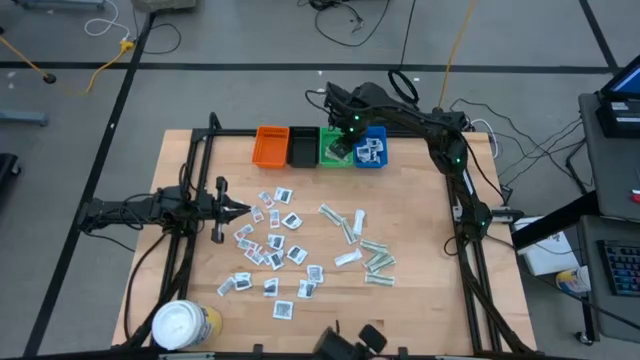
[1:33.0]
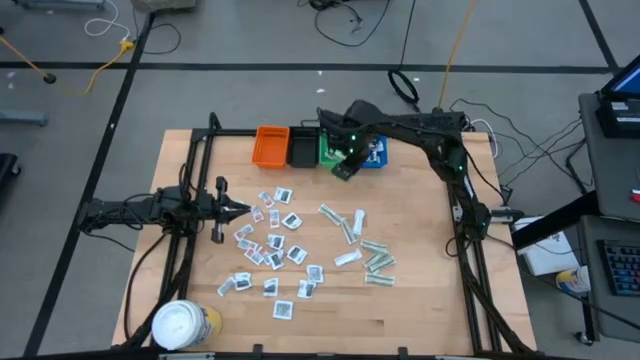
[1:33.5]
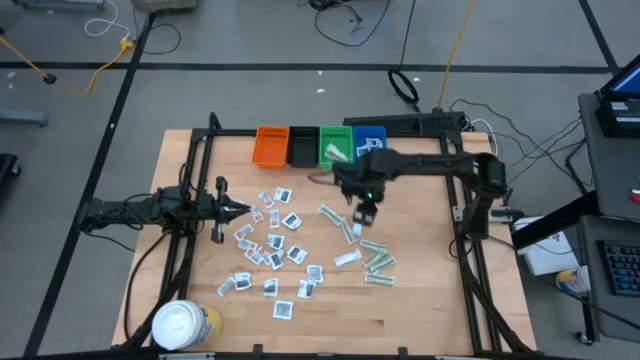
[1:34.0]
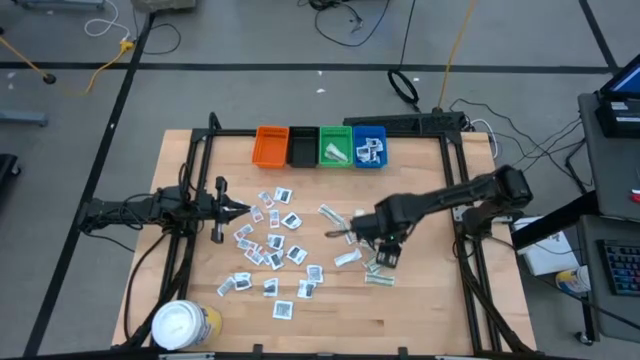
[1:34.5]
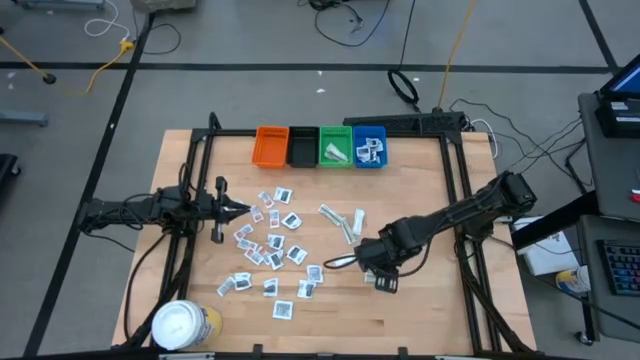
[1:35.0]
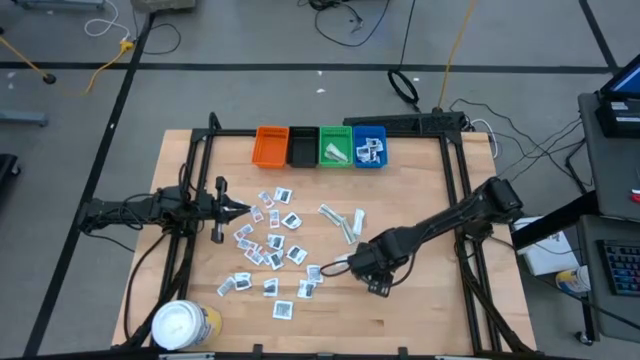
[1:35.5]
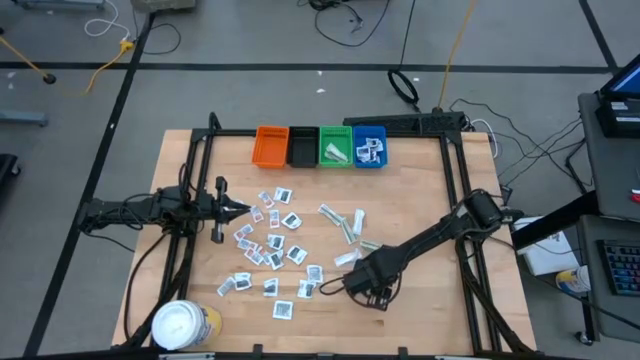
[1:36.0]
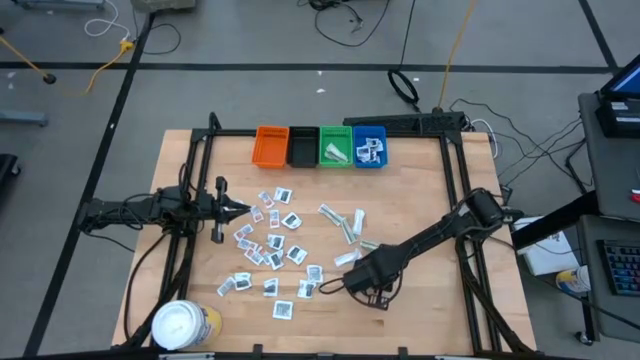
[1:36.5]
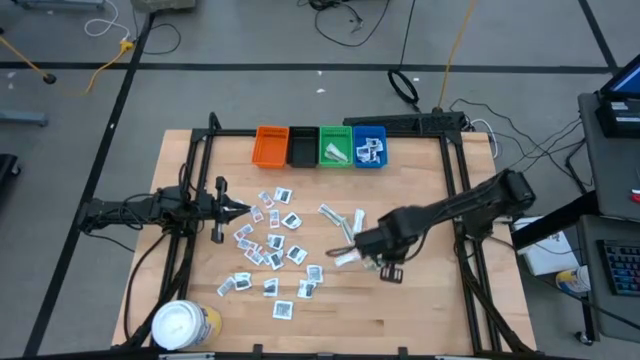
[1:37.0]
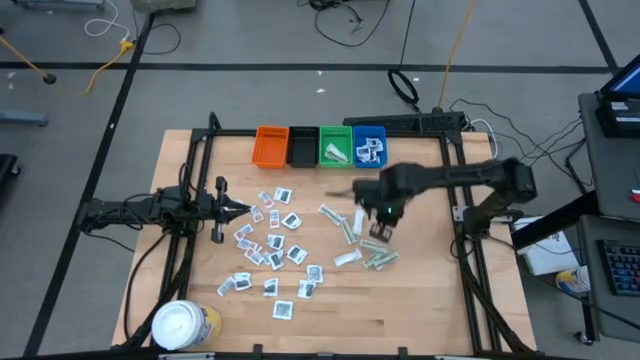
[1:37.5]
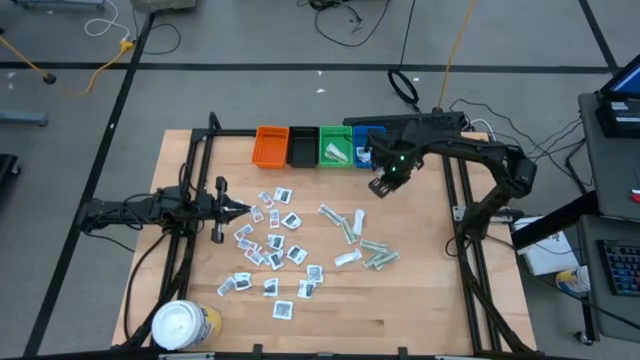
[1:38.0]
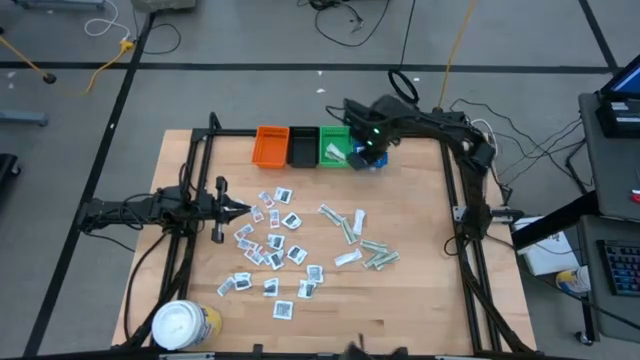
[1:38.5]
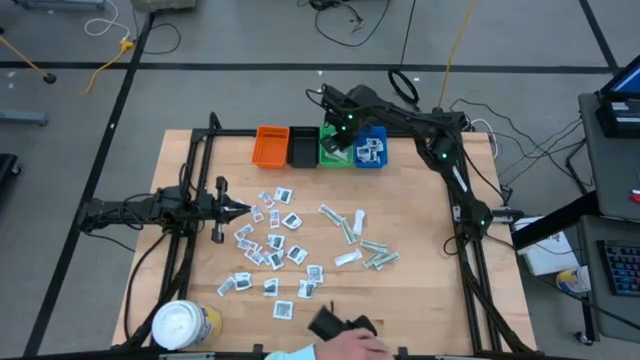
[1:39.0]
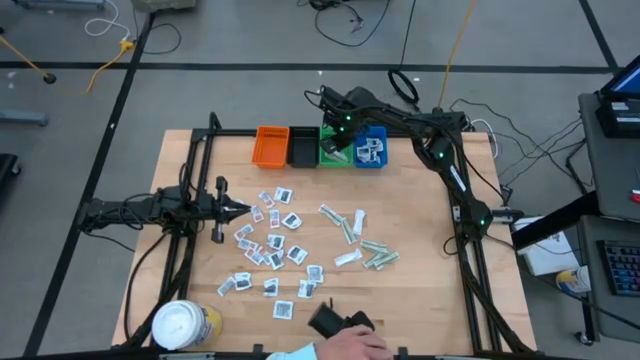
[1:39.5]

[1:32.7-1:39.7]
Task: Pick & Place First Aid Supplies
Put the green bandage into the green bin

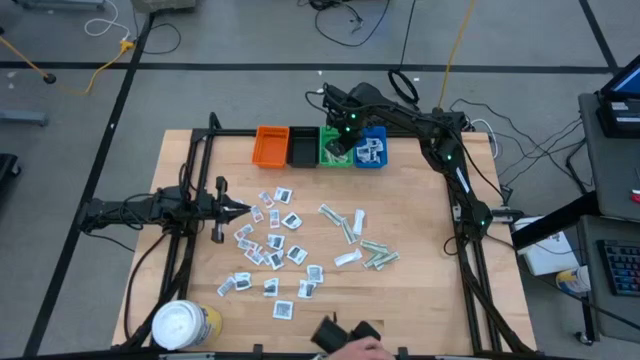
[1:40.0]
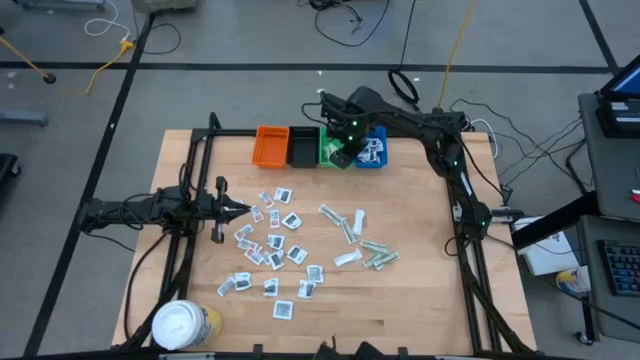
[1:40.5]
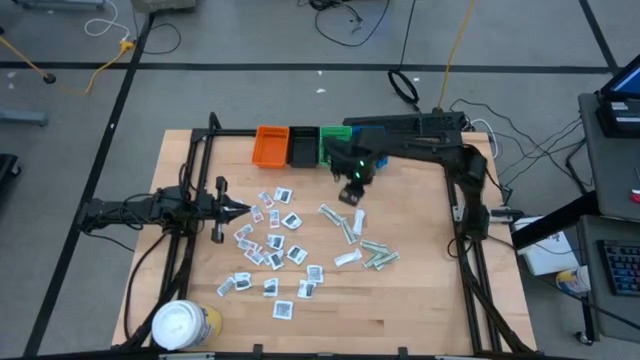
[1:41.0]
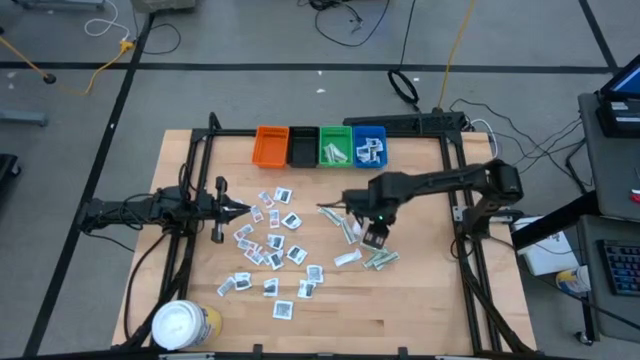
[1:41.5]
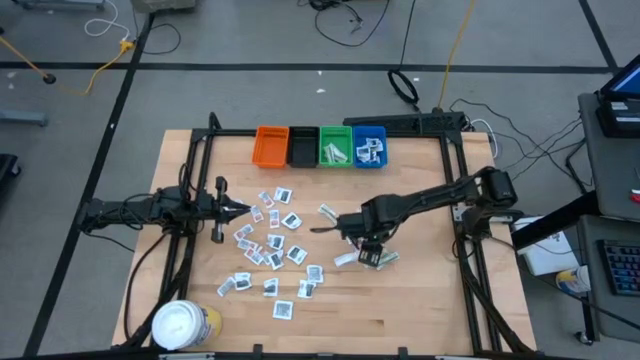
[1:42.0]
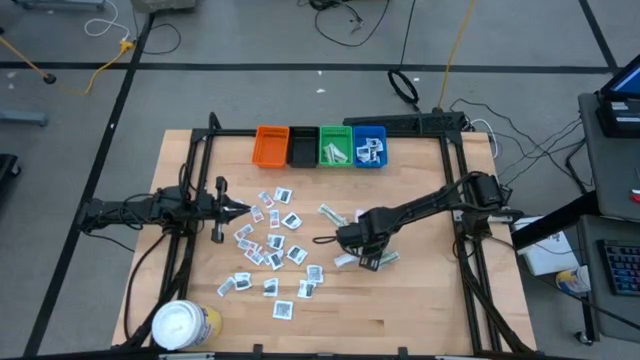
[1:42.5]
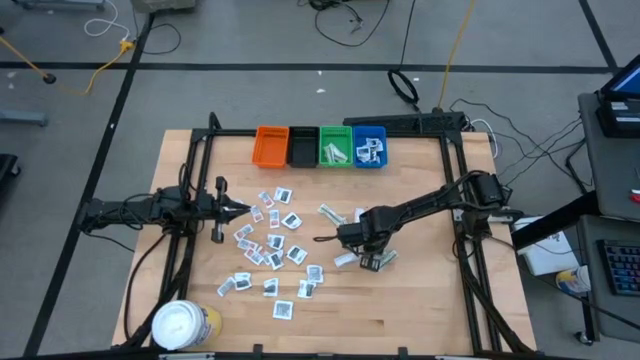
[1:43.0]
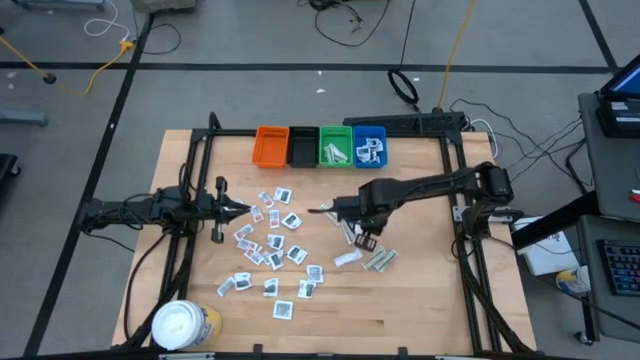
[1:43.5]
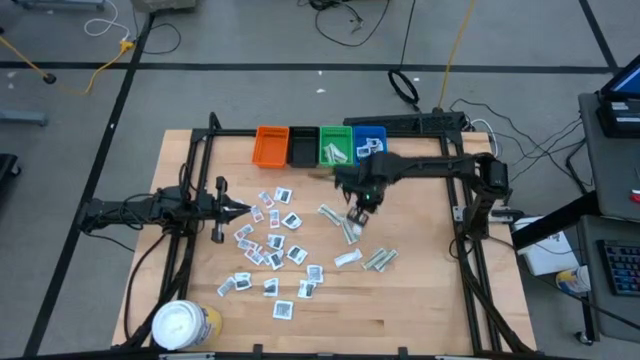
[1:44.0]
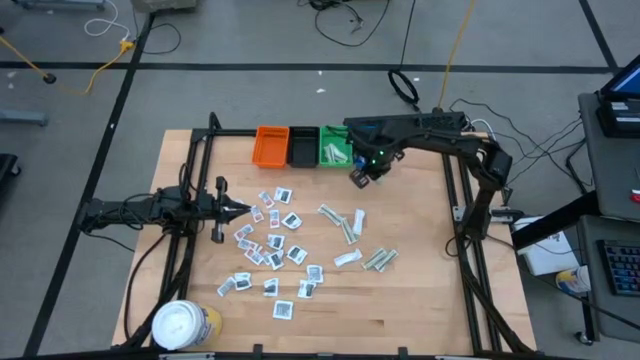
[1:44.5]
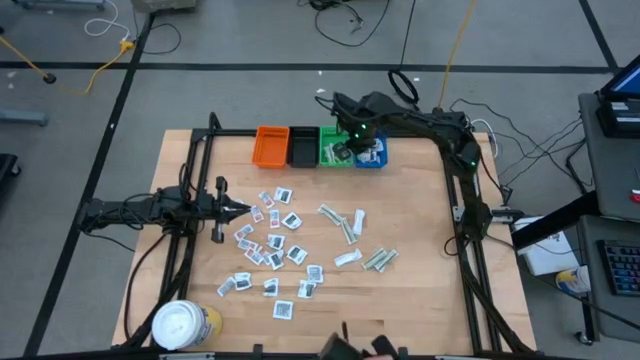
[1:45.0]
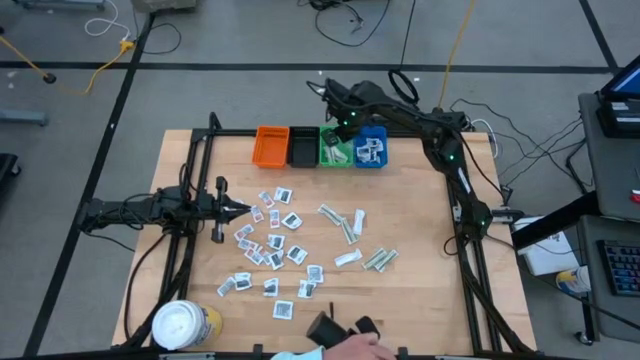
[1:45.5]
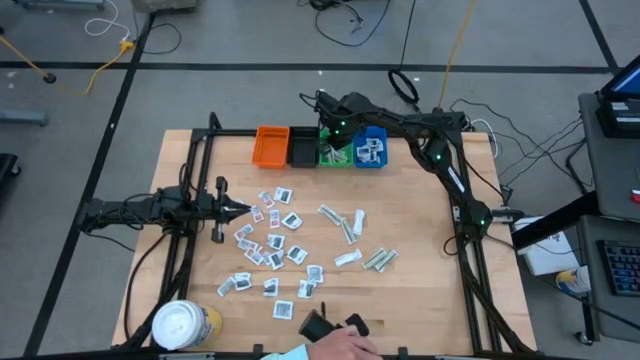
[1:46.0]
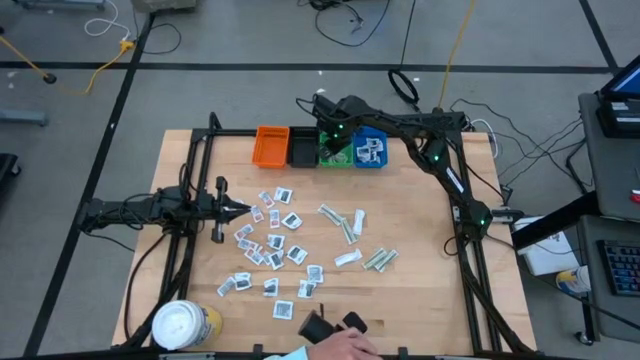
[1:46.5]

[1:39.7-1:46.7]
Put the green bandage into the green bin

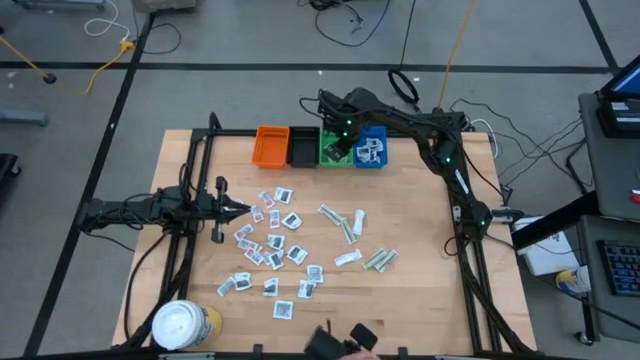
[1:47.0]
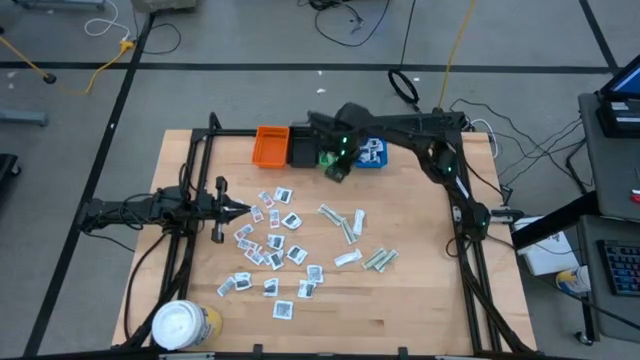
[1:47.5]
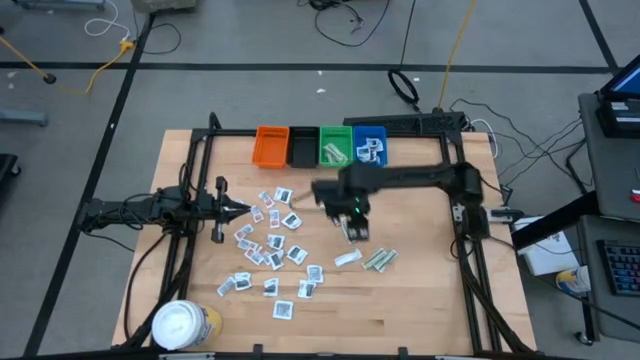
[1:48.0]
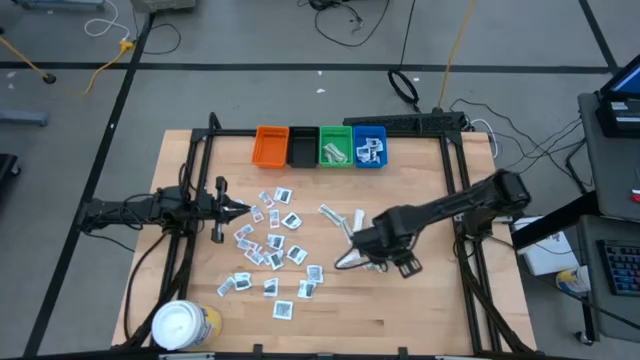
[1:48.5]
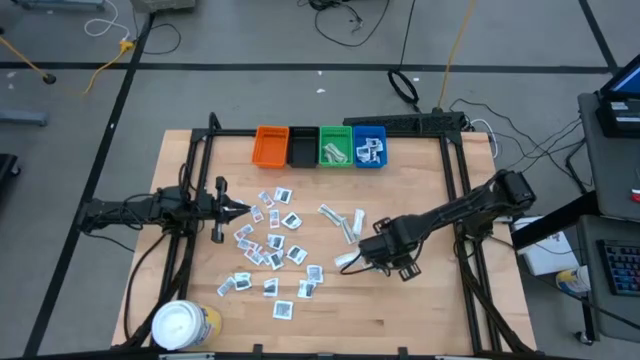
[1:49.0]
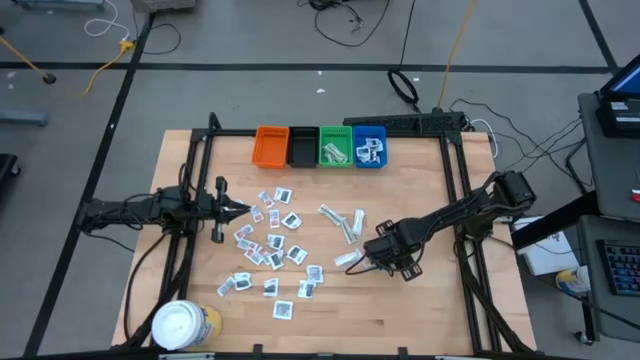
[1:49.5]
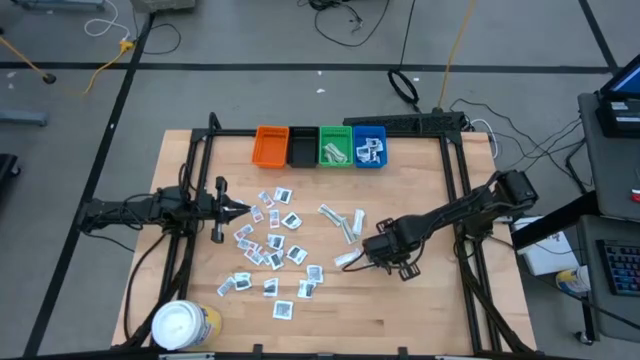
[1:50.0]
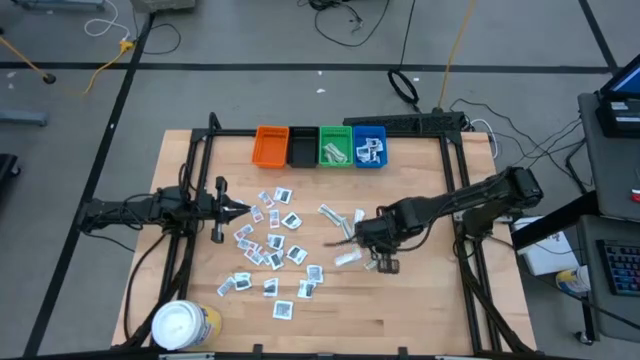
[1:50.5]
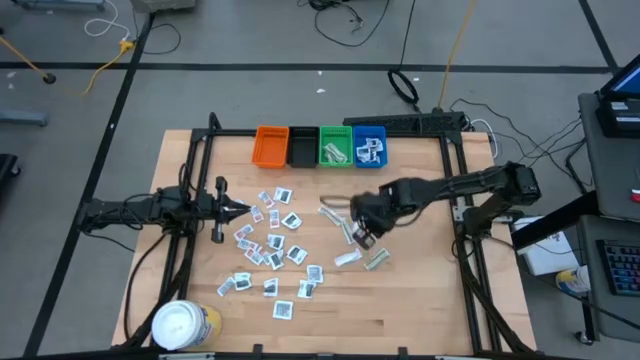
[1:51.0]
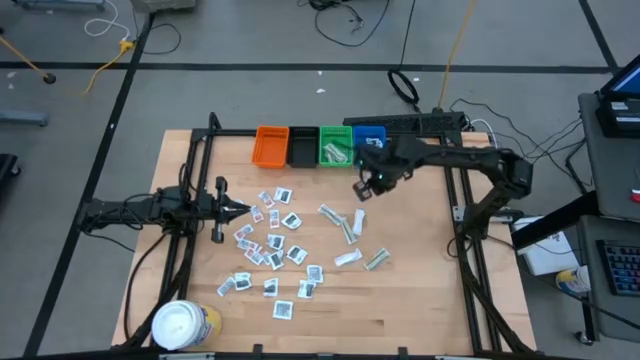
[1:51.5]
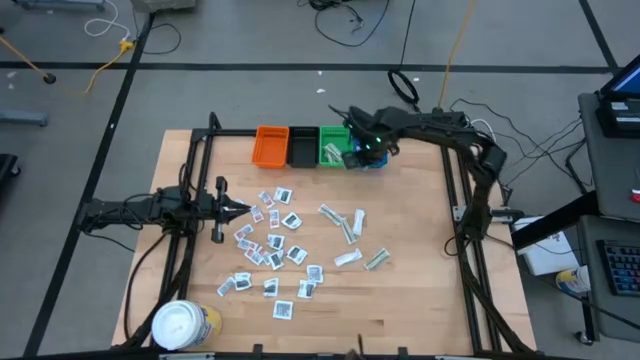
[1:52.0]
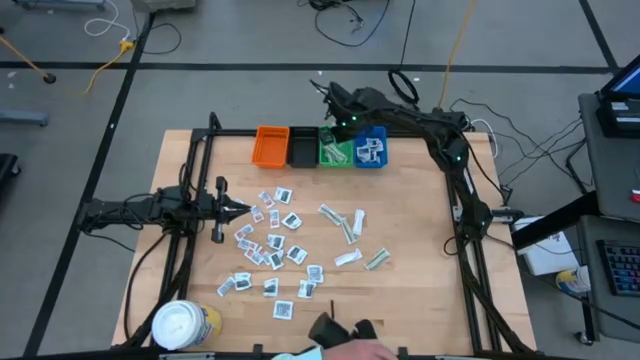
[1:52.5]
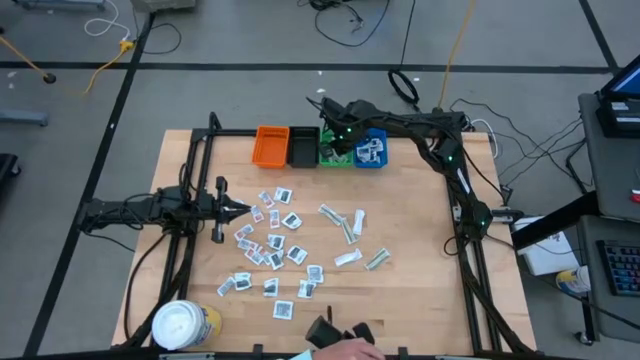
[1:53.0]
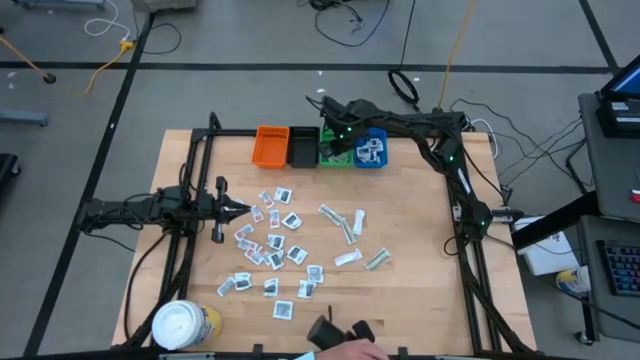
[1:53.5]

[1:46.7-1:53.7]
Put the green bandage into the green bin
